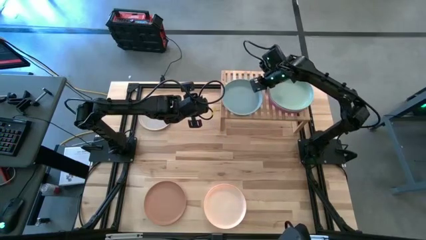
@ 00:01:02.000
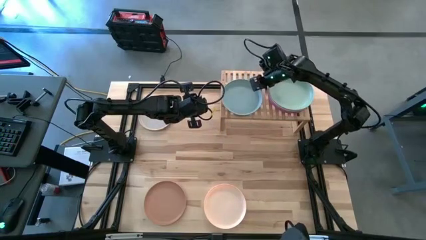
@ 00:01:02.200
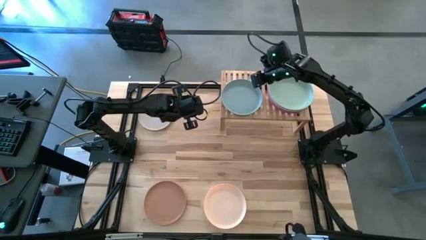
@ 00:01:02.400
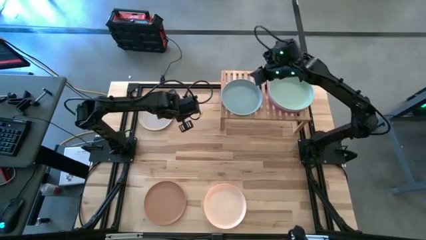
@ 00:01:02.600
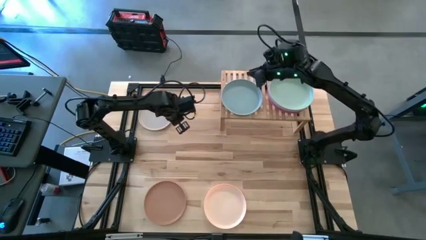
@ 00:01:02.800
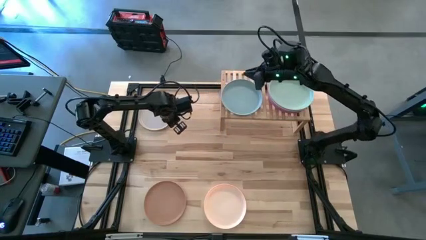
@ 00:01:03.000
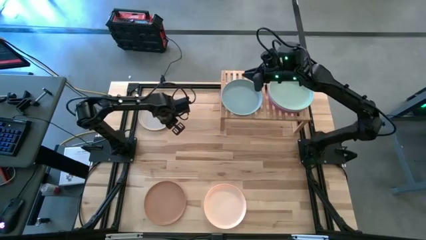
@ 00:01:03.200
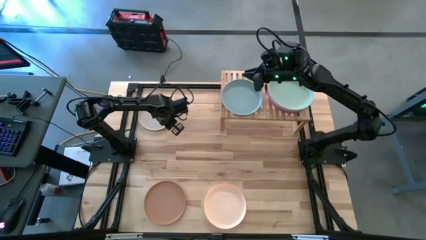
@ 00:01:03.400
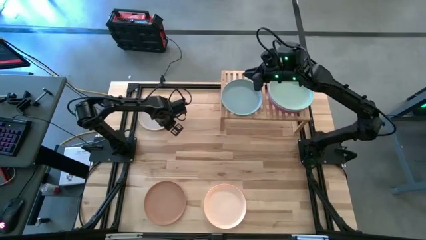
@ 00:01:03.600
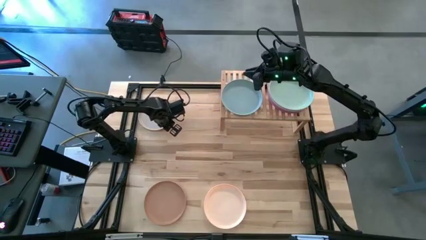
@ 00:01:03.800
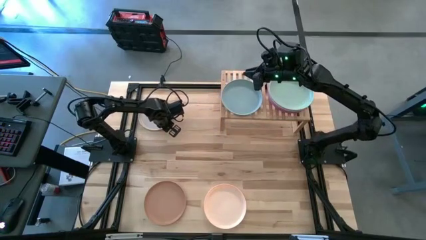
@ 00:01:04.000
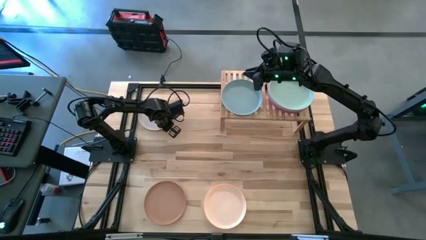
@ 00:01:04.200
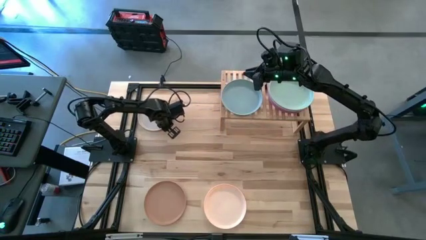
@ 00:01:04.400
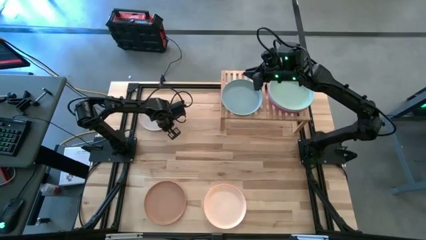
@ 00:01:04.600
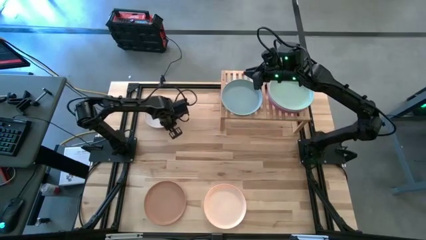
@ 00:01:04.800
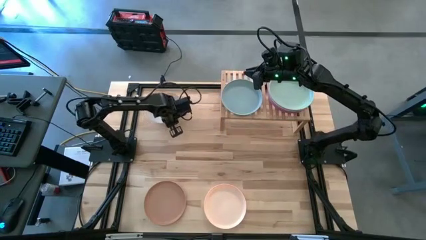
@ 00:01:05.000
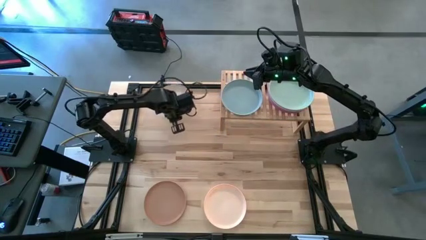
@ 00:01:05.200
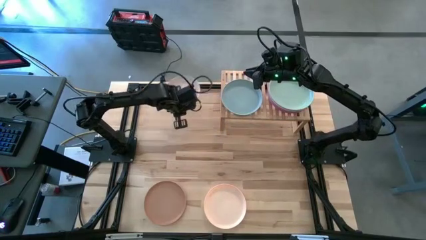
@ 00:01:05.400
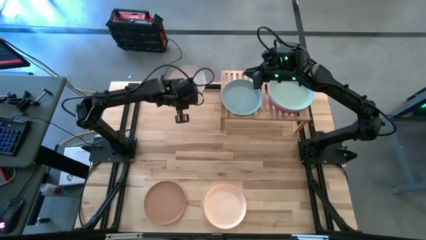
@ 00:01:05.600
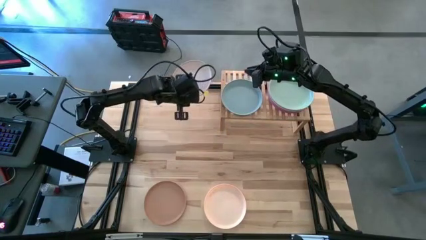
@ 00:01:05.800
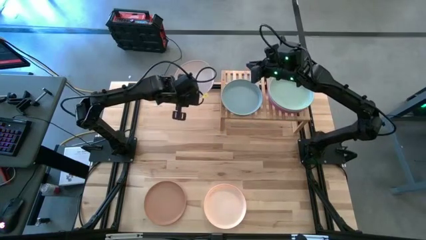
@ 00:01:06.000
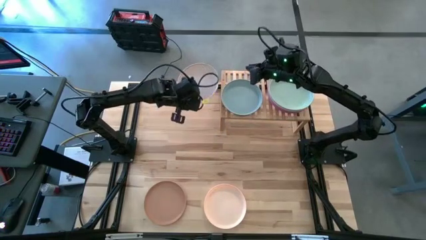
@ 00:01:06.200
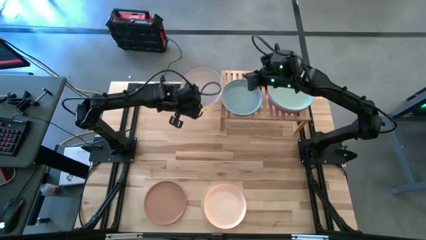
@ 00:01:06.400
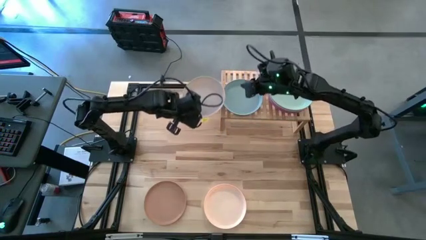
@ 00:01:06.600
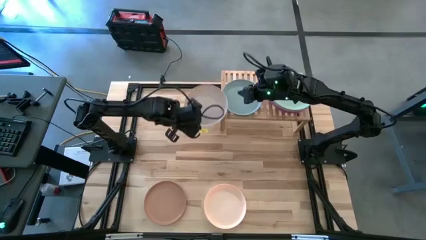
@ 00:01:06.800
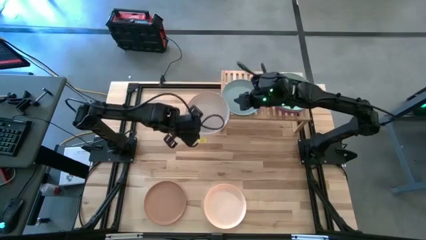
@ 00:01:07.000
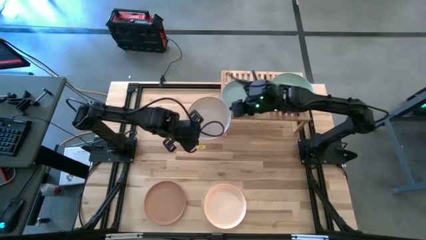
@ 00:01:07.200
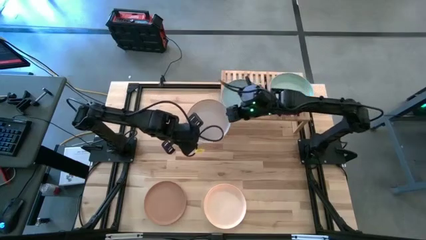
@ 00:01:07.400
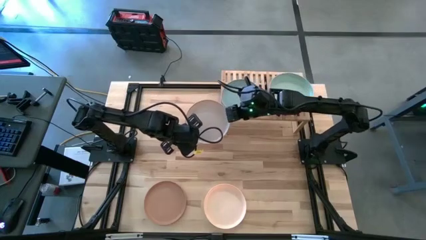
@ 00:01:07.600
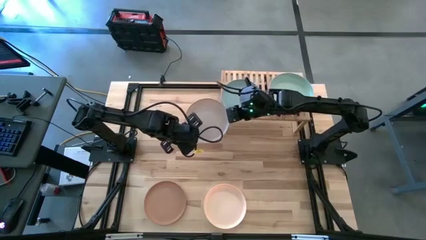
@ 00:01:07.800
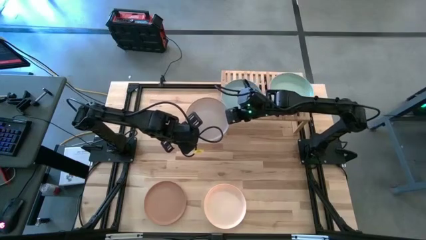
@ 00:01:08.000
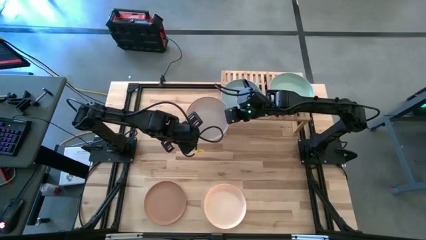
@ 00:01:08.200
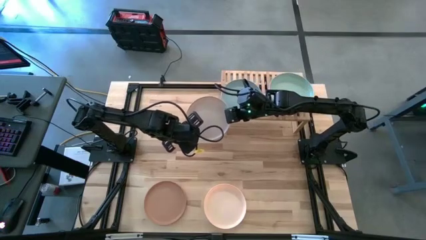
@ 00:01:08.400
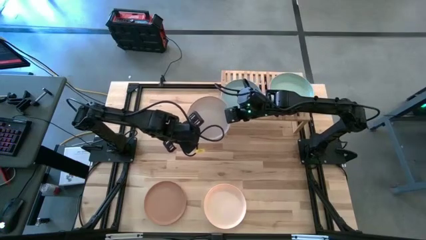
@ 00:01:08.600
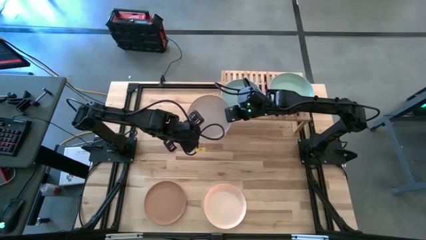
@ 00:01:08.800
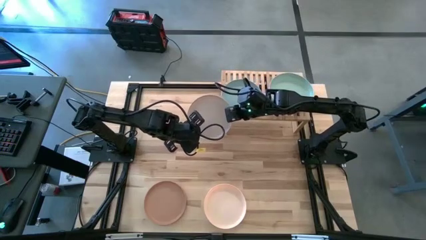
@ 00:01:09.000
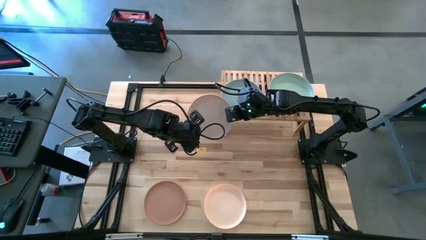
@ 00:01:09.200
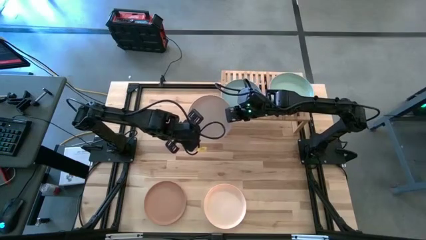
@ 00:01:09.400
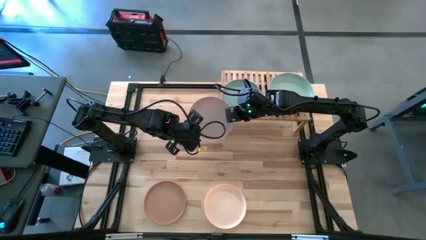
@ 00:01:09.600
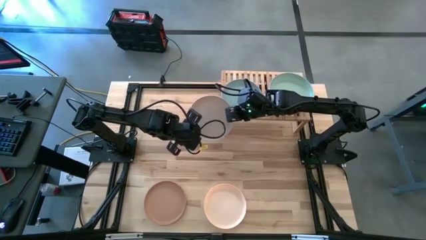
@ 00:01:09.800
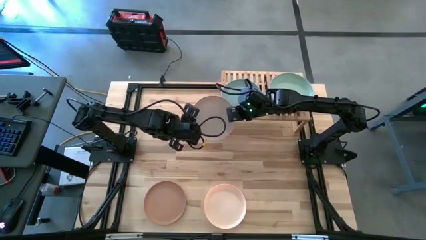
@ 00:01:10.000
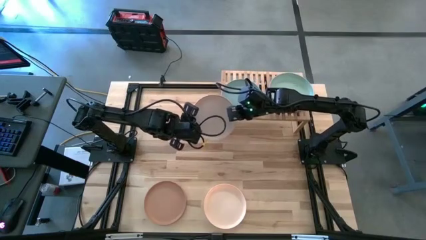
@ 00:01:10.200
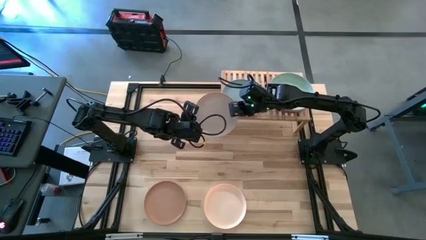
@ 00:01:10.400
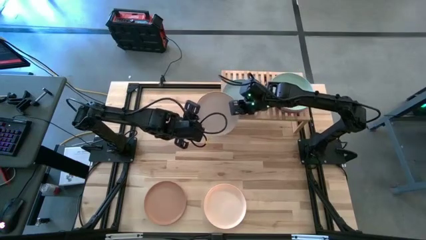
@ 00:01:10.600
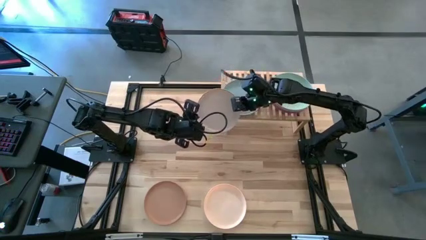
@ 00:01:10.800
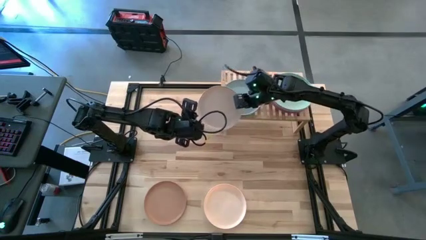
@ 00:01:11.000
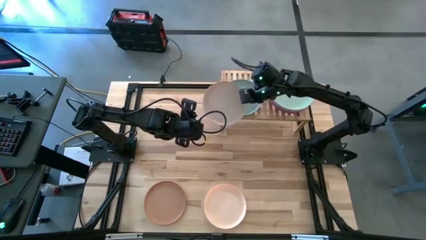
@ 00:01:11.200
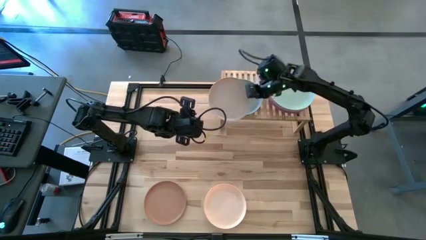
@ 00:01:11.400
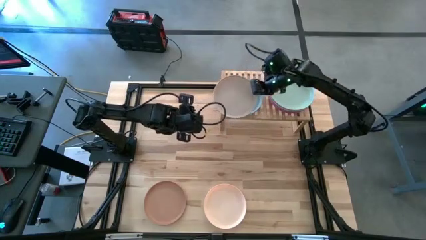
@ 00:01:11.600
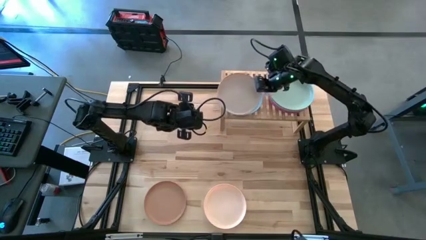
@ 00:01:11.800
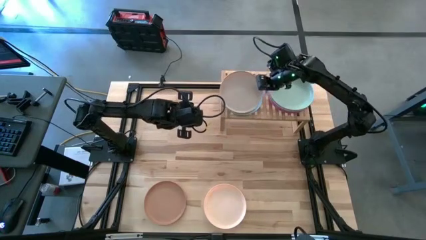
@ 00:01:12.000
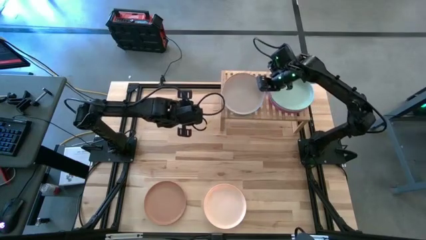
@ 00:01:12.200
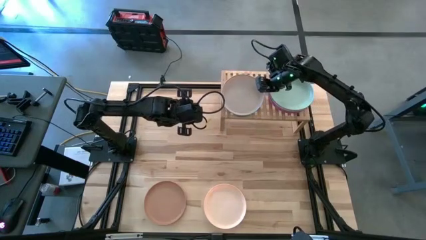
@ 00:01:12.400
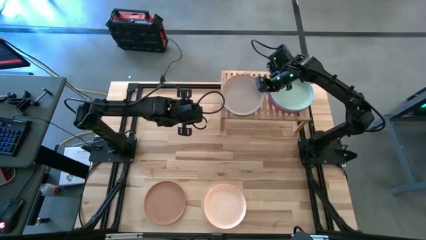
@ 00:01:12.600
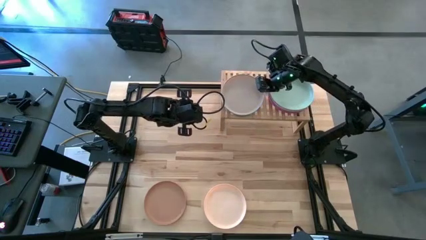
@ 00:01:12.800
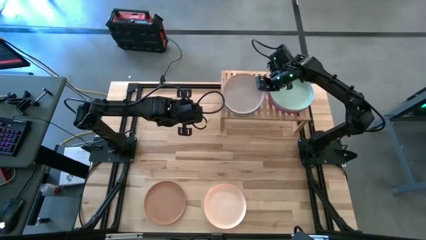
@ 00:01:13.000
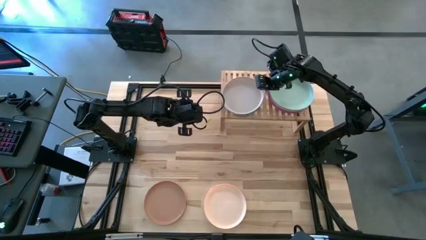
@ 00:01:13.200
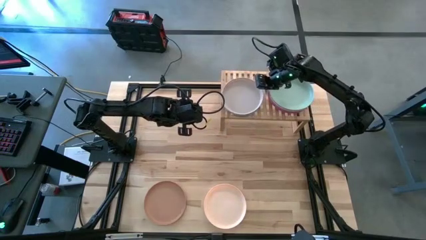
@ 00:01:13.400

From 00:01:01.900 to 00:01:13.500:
Task: Place and stack plates onto a shelf
Stack the gray plate on top of the light blue plate on the shelf
